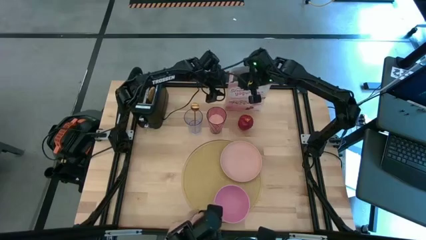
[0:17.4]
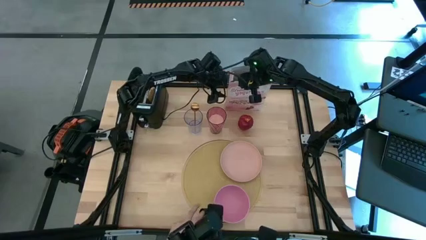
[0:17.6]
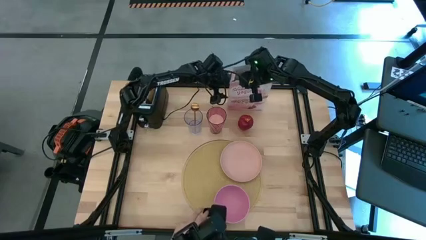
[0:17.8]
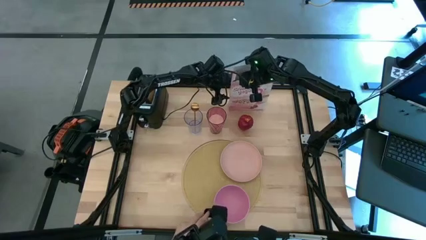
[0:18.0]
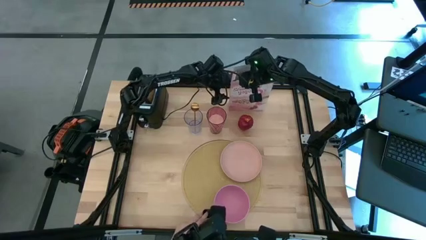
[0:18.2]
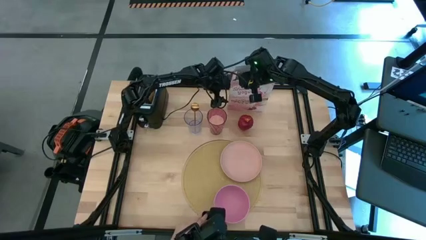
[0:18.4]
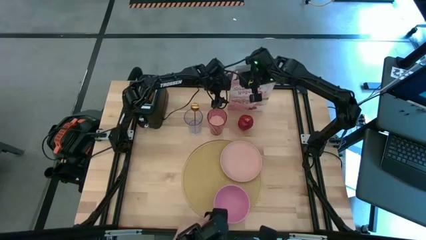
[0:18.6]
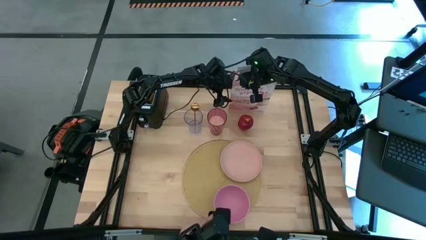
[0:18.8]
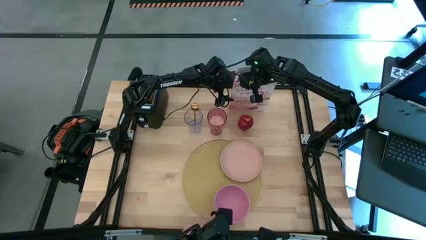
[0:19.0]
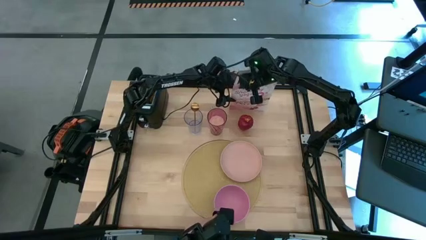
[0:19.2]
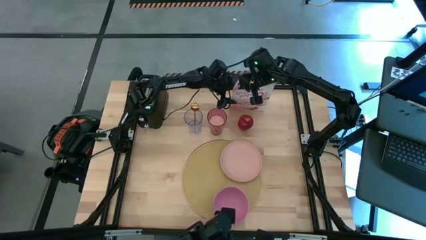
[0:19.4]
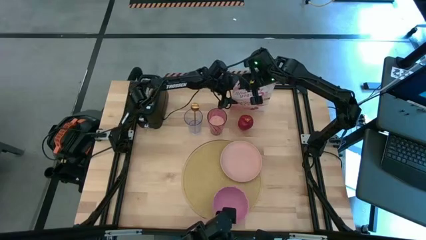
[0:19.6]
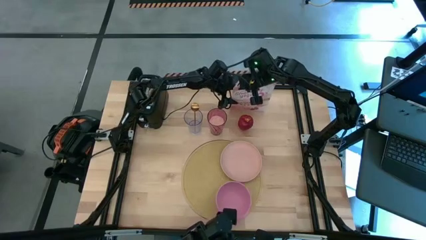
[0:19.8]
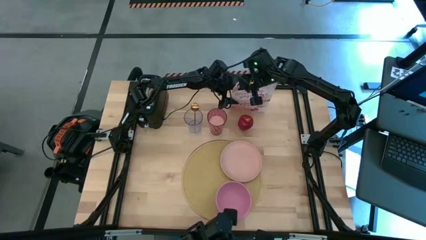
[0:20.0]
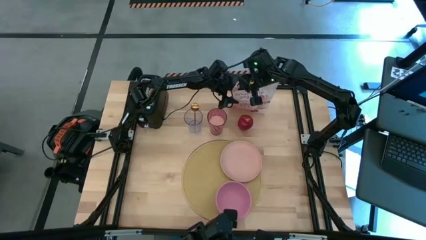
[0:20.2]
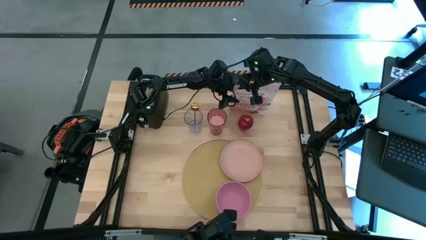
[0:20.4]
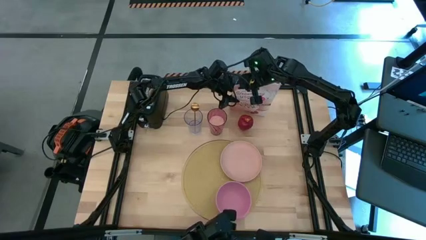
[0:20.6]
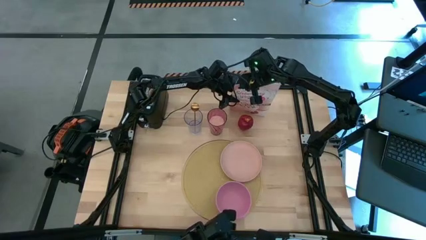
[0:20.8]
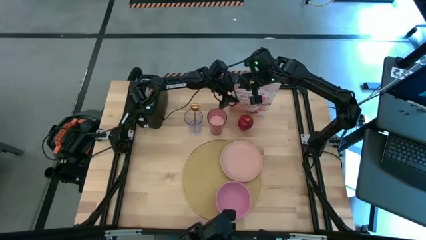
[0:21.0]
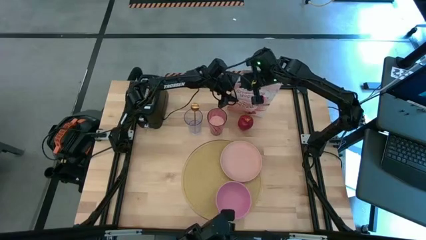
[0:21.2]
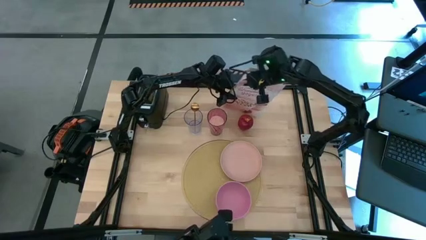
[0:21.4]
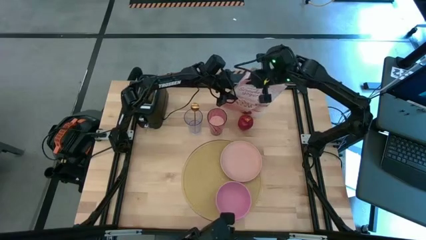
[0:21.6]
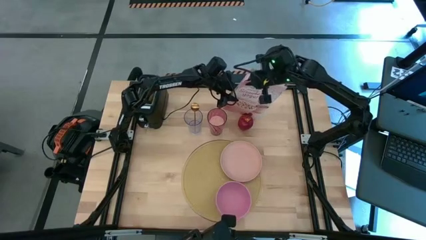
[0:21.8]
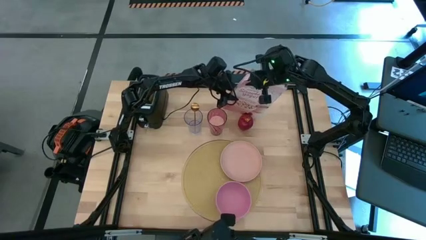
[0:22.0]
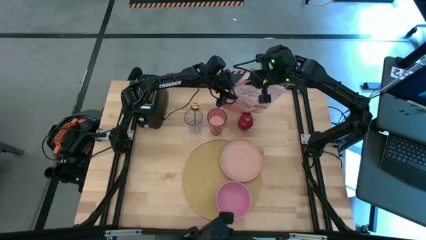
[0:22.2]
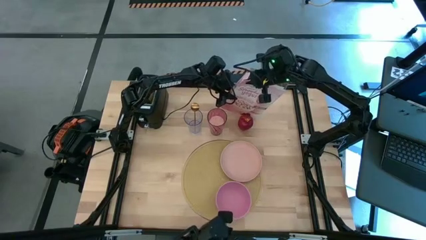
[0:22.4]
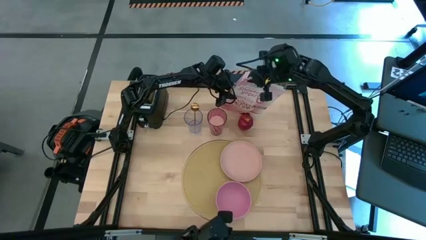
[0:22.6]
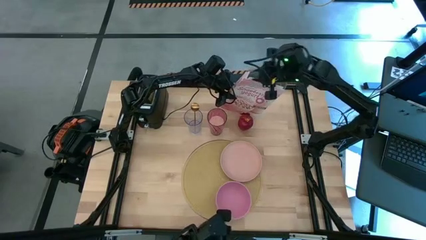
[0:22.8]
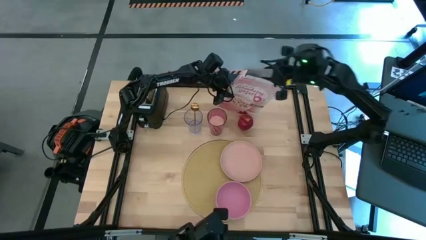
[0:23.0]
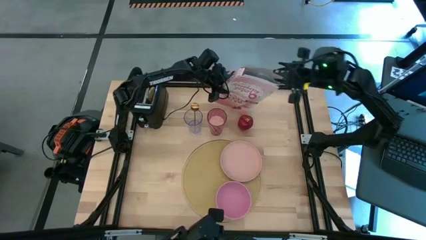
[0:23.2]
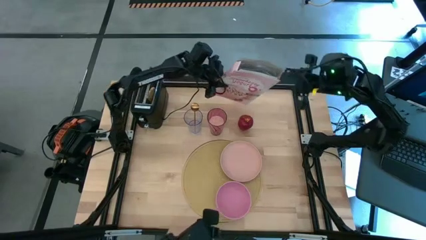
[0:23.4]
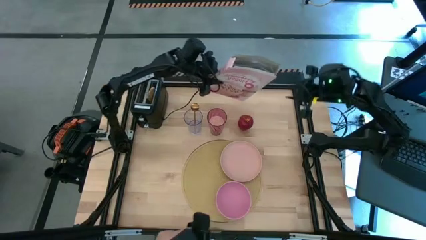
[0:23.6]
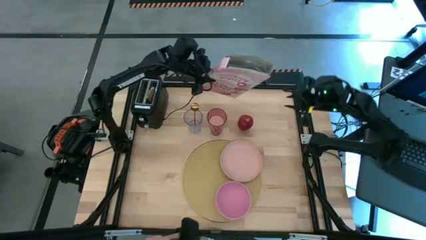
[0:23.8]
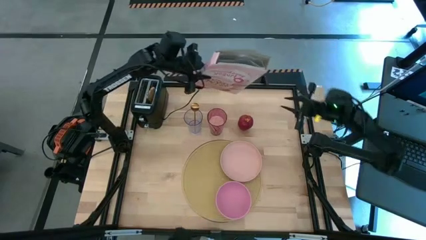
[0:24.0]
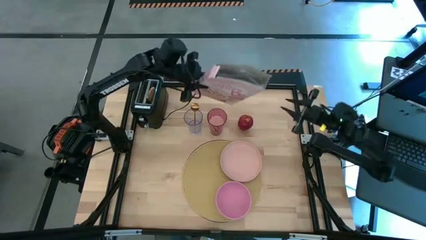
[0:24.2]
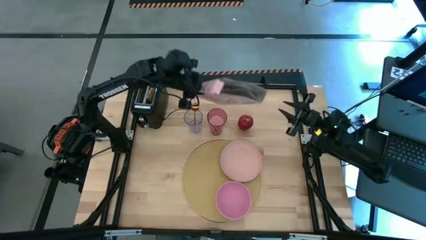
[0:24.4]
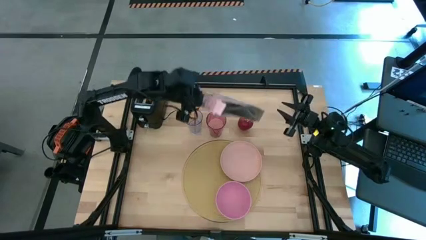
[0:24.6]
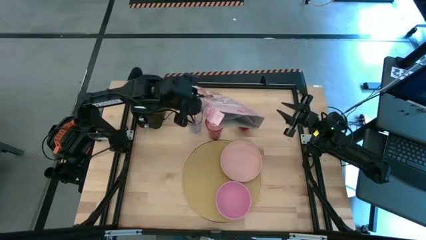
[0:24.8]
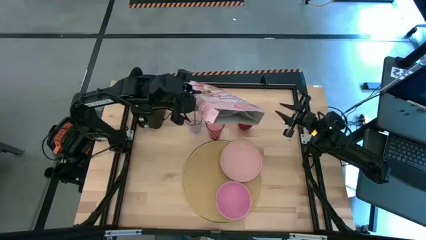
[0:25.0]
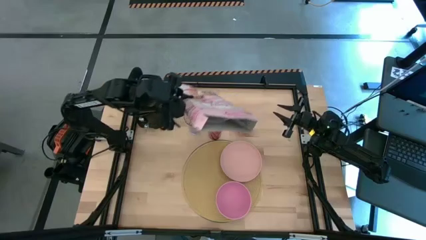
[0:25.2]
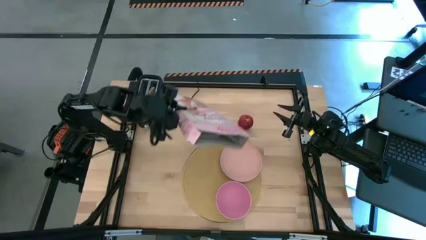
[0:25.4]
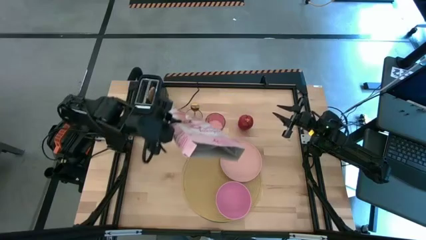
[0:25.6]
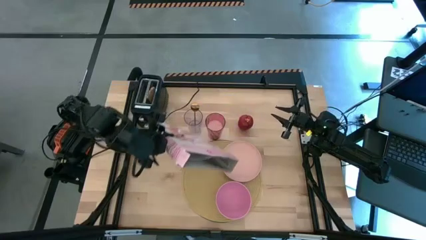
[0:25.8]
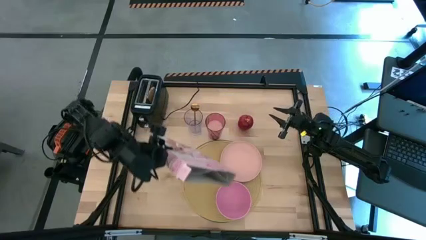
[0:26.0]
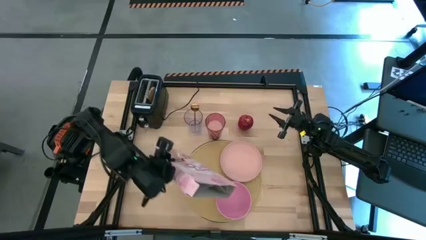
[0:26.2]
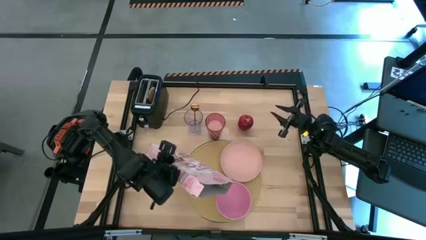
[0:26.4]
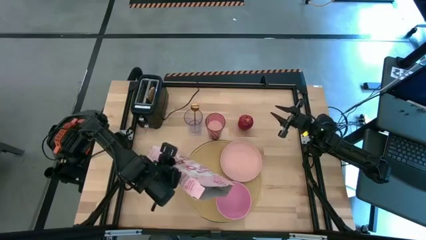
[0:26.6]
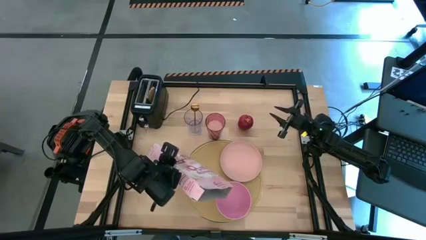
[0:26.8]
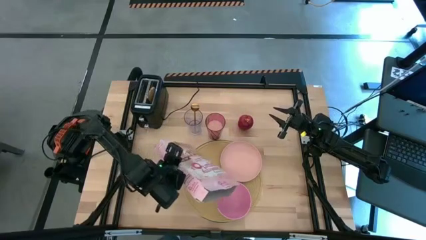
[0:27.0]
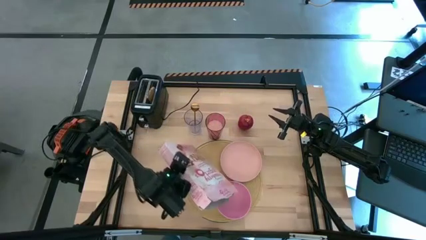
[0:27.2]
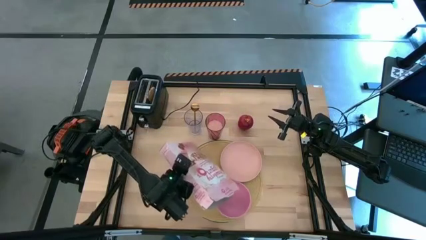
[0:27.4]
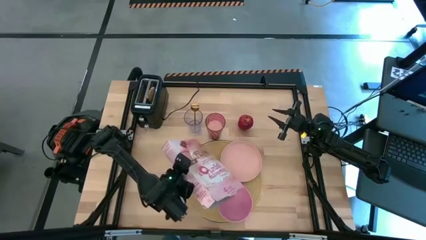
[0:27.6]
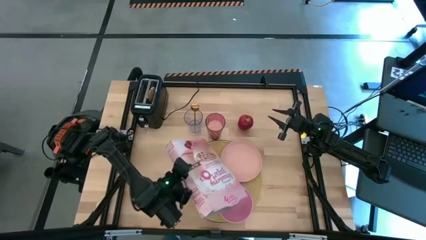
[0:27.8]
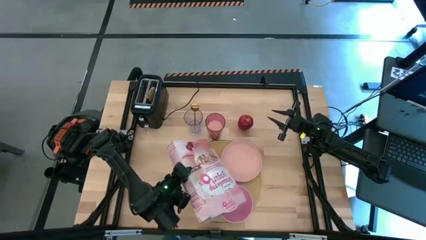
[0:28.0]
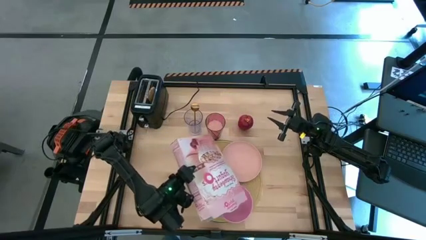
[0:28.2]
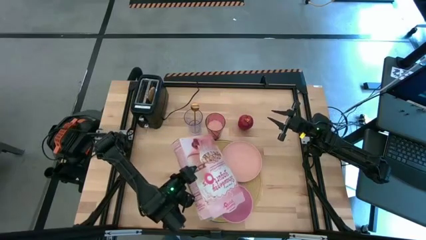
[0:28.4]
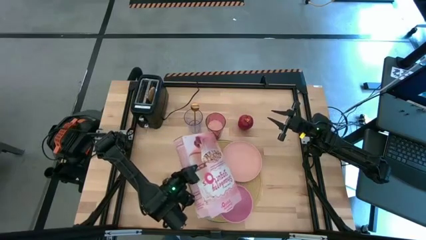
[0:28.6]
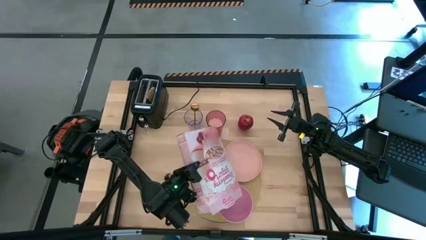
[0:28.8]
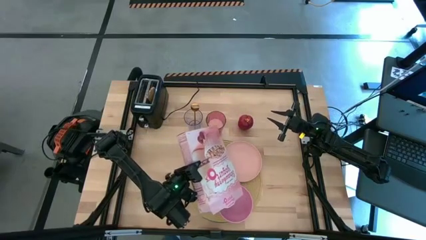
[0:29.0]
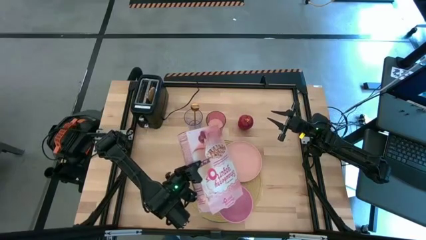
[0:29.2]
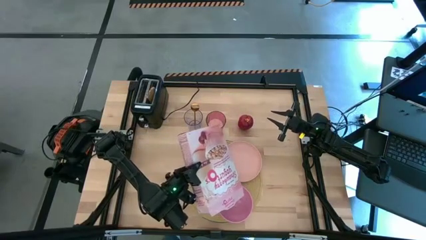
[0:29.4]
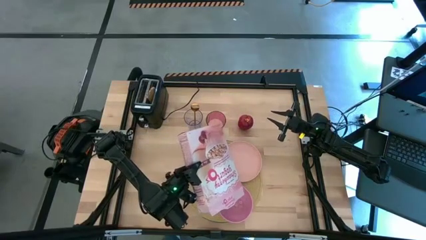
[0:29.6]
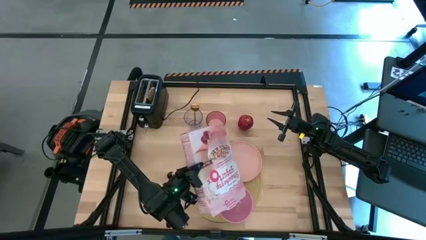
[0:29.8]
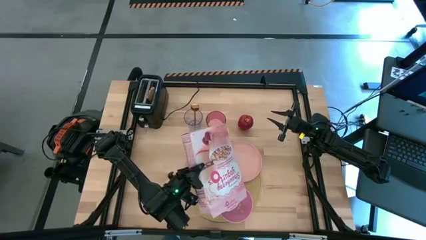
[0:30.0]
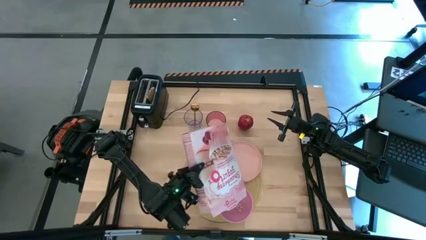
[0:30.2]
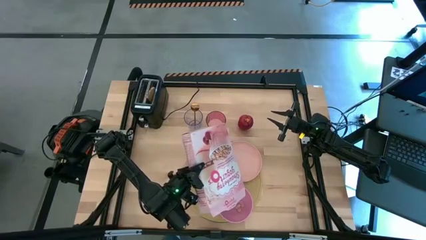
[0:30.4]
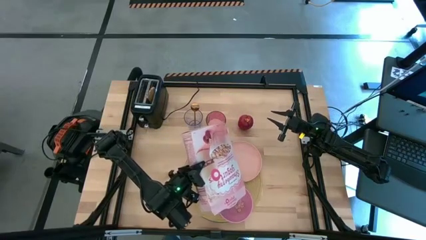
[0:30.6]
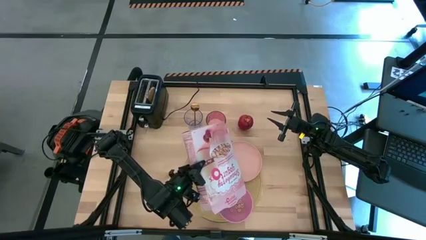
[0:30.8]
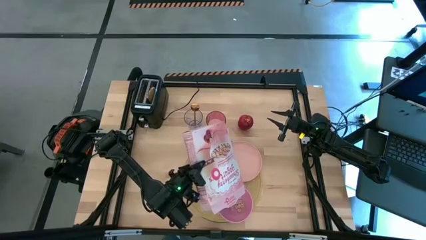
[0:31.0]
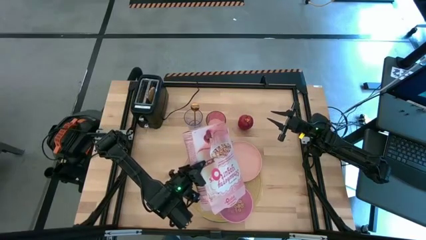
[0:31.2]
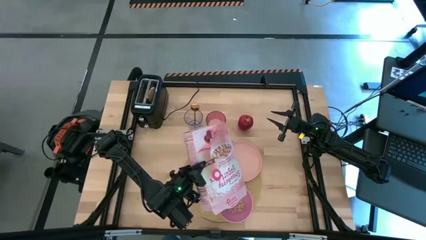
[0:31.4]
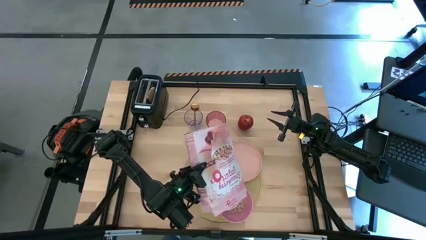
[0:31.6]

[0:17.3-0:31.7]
Task: Arrange a breakfast setting
Pour the cereal from the pink cereal box into the pink bowl
